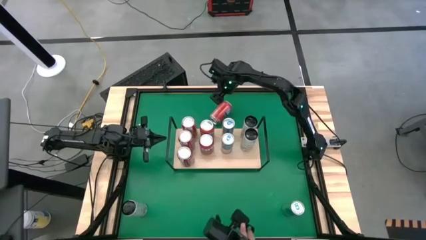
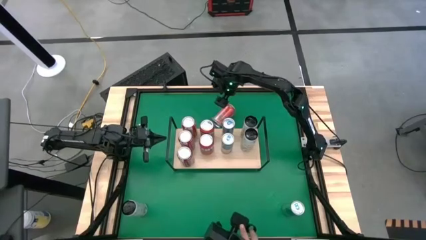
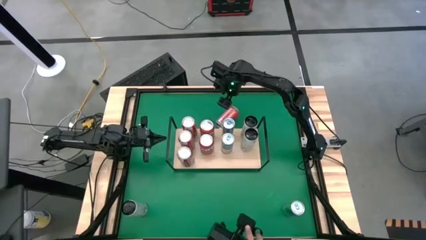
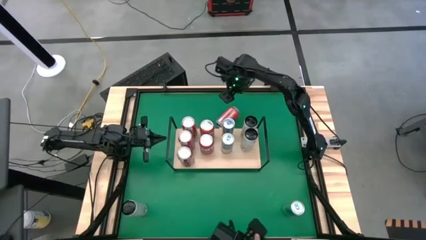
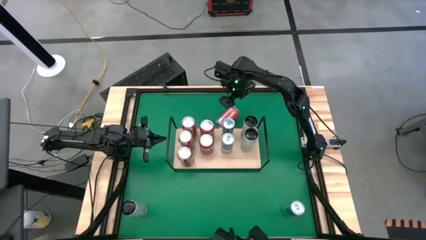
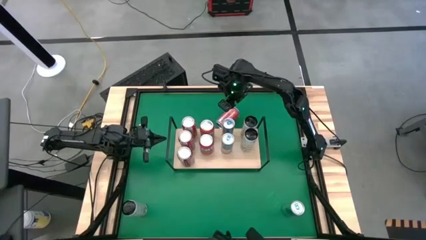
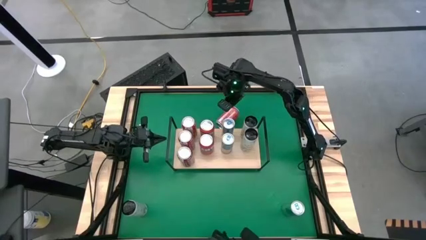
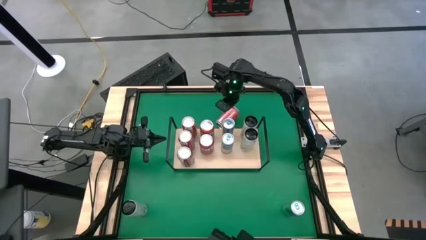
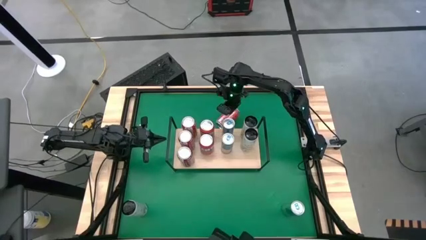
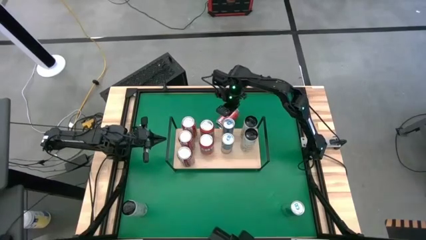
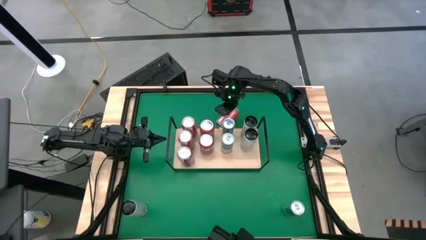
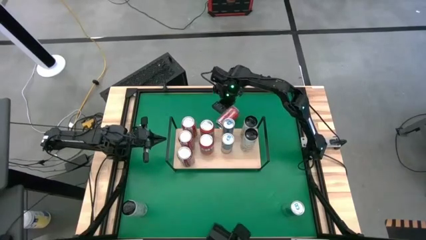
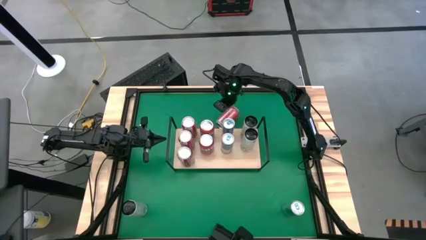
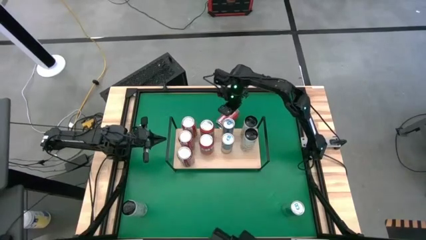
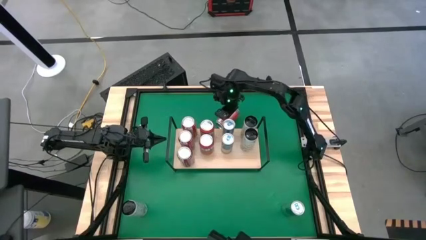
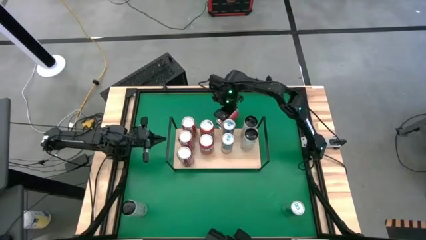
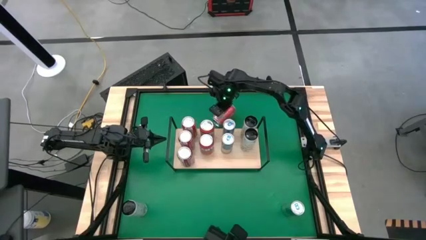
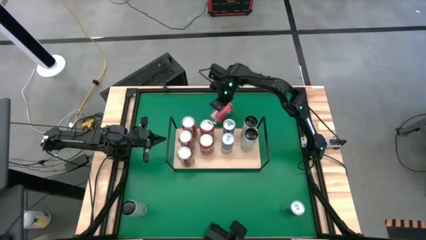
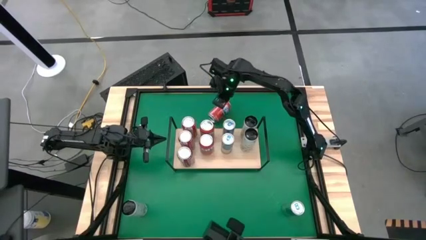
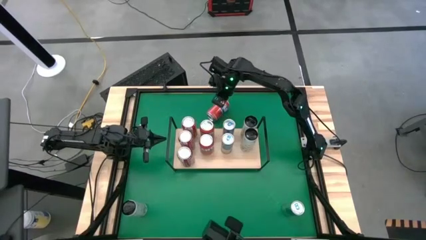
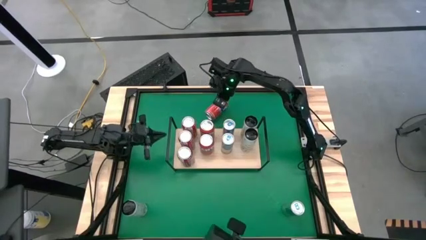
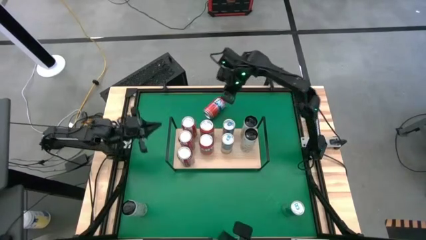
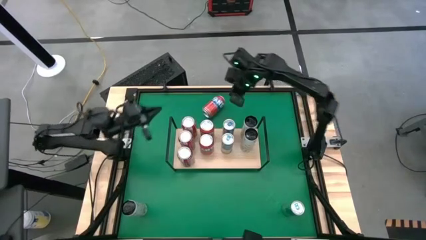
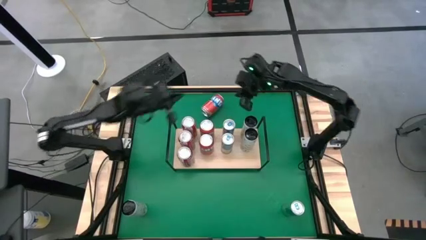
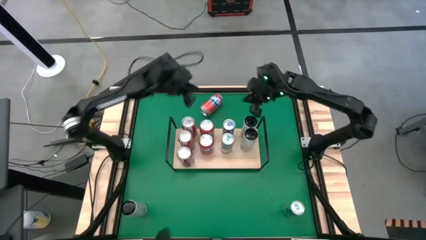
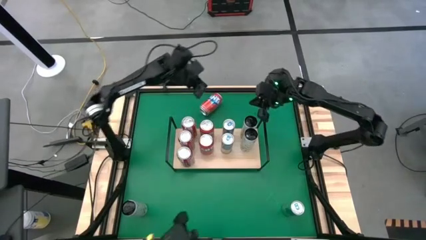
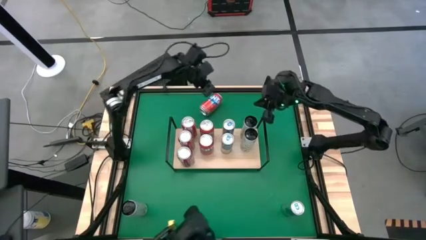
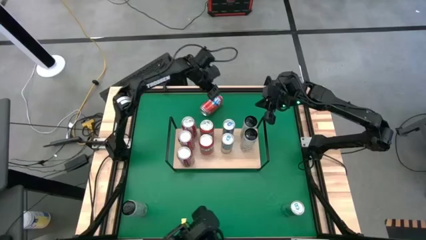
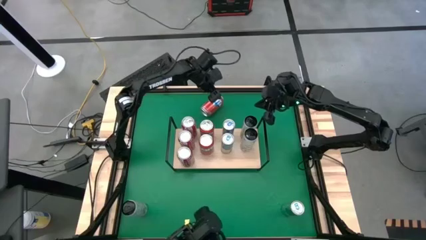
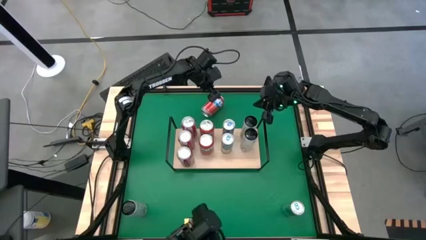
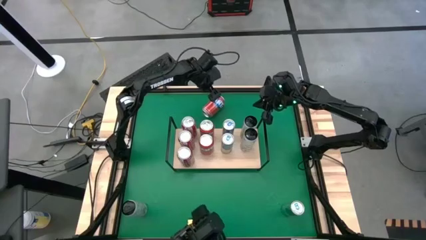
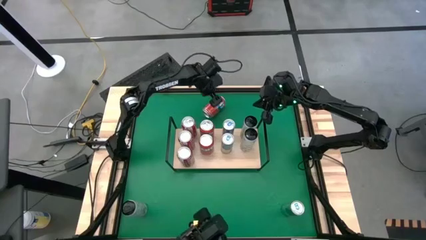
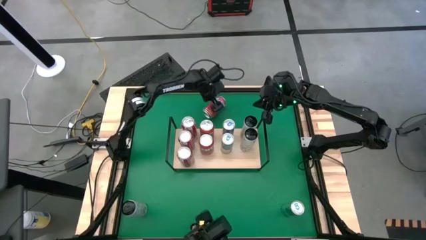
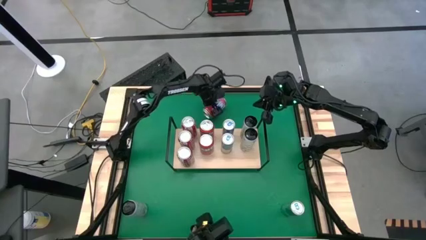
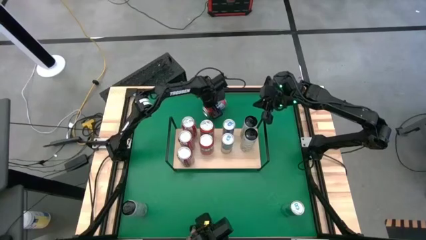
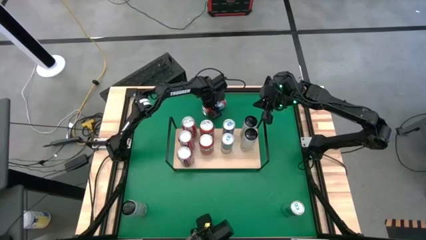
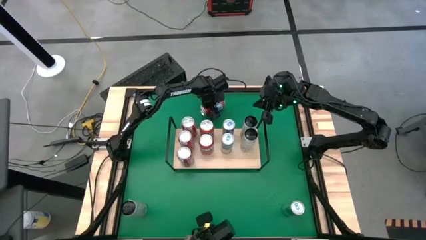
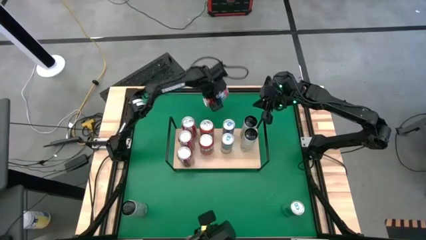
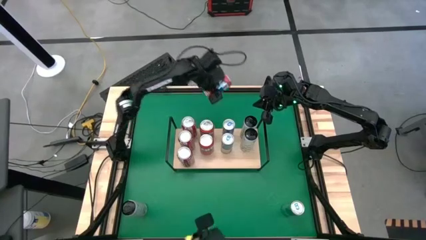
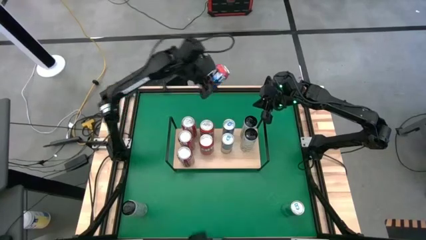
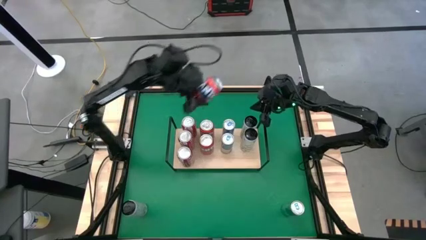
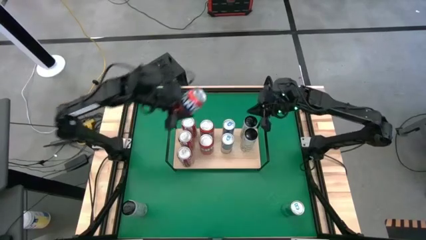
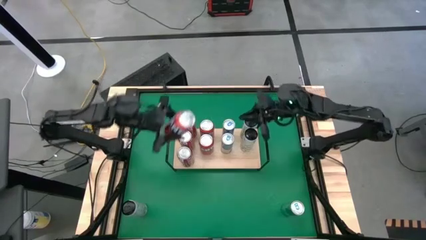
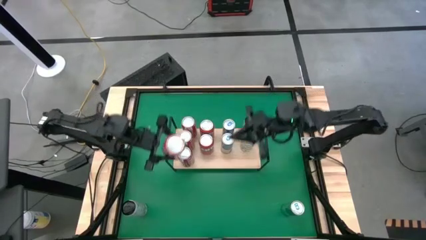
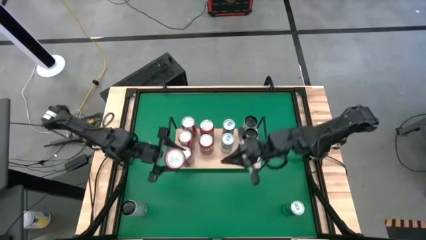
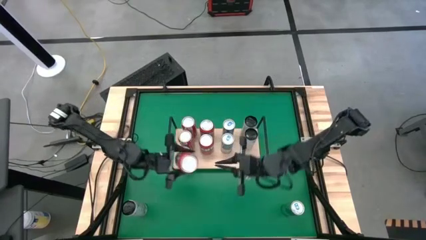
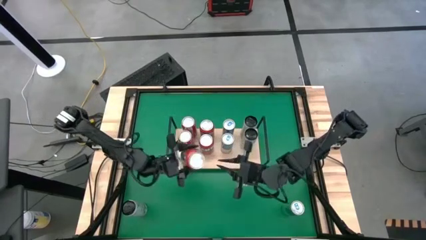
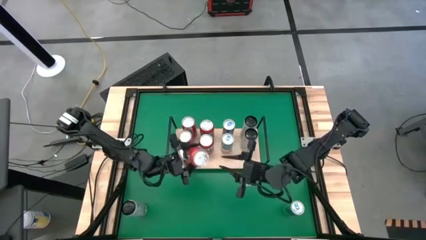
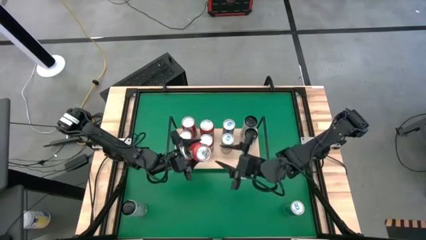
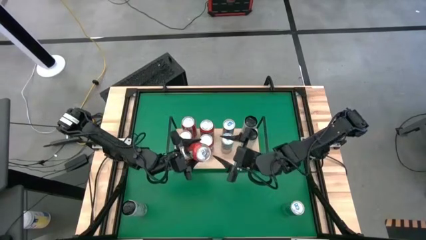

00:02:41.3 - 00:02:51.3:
Task: Place canned beverage on shelf
Put the orange soda can on the shelf aligned with the other orange soda cans
